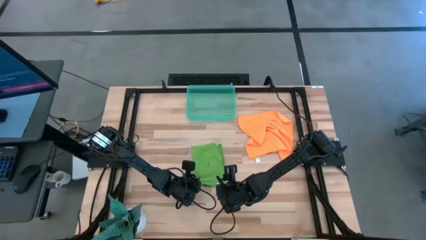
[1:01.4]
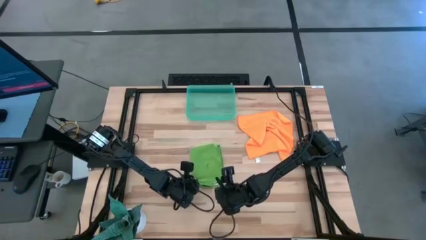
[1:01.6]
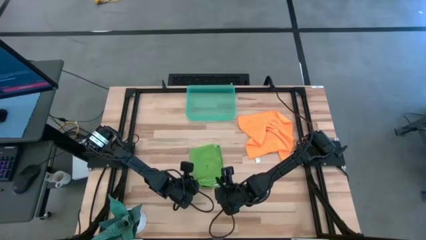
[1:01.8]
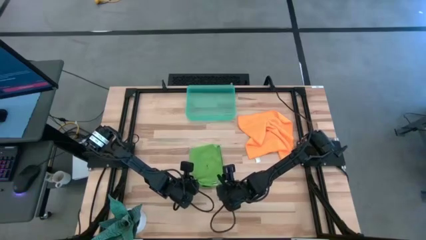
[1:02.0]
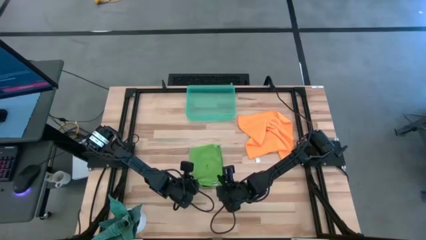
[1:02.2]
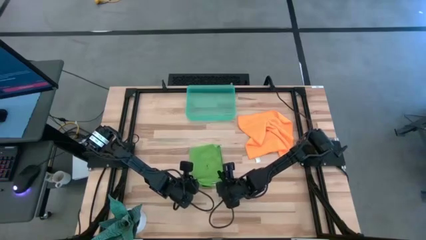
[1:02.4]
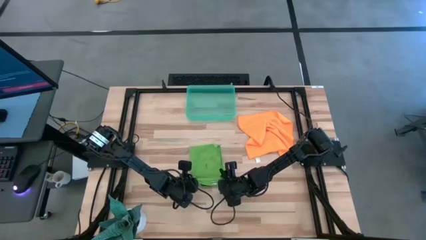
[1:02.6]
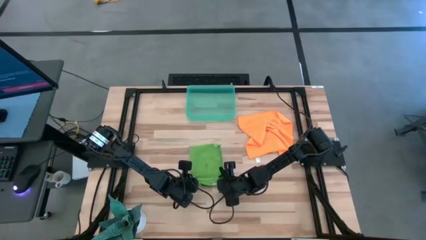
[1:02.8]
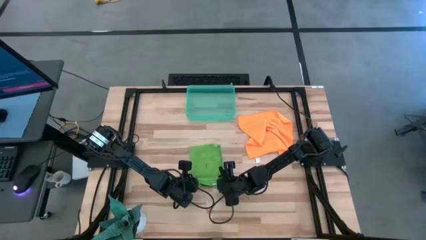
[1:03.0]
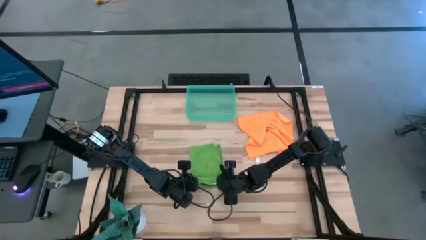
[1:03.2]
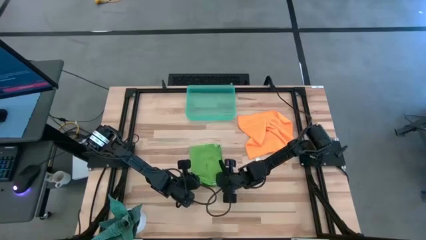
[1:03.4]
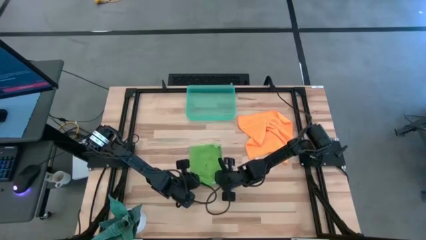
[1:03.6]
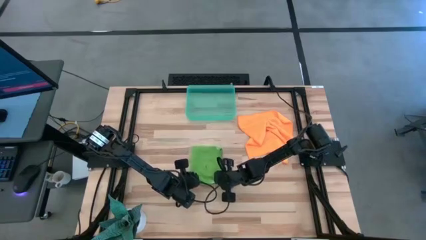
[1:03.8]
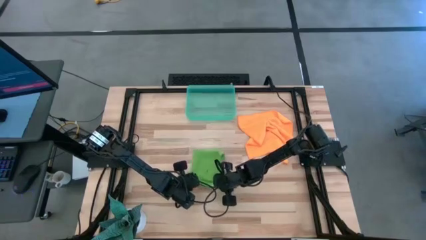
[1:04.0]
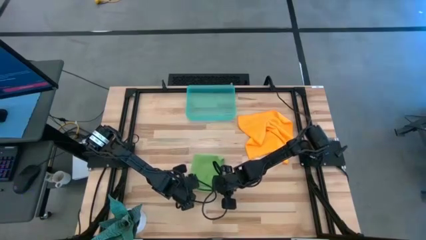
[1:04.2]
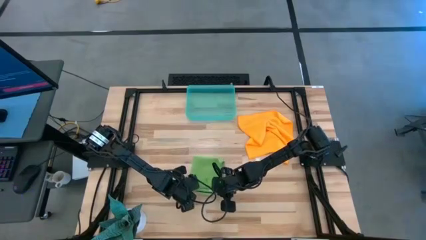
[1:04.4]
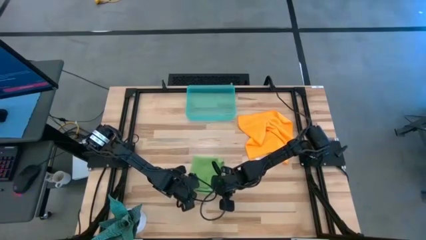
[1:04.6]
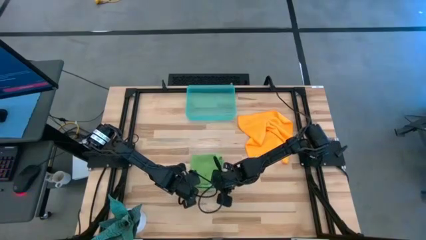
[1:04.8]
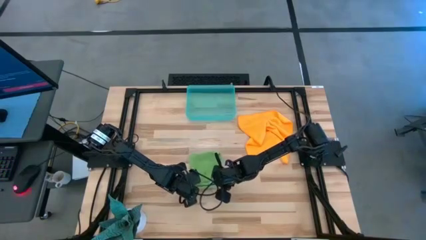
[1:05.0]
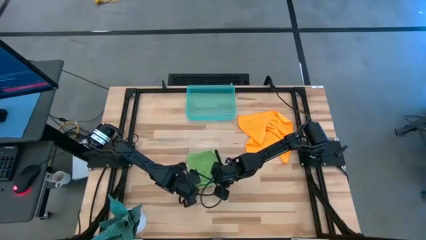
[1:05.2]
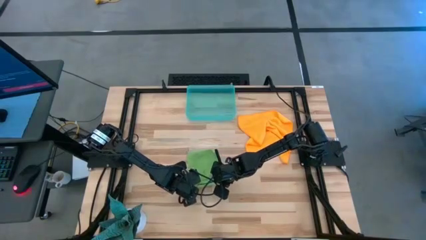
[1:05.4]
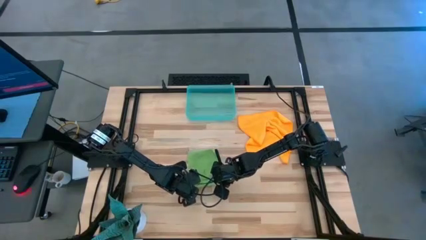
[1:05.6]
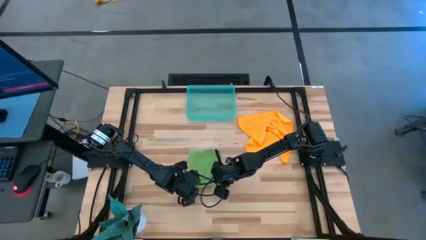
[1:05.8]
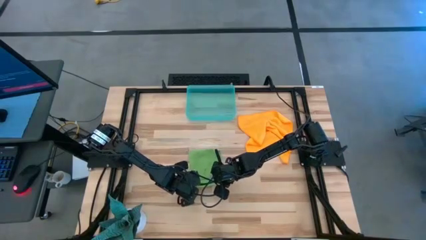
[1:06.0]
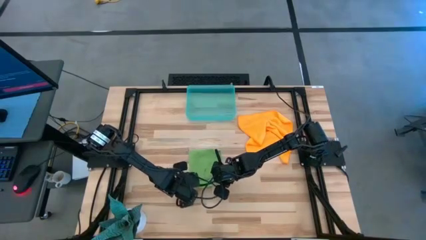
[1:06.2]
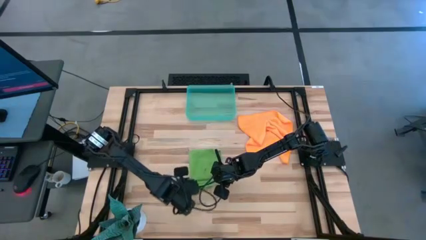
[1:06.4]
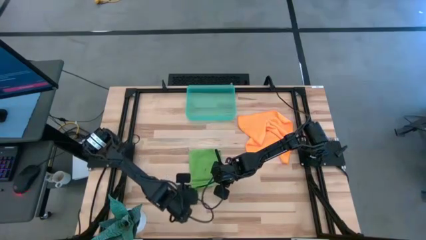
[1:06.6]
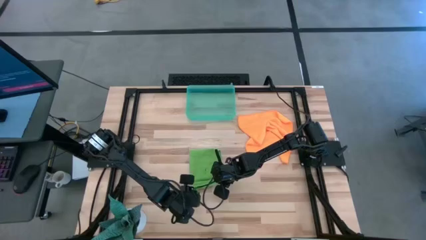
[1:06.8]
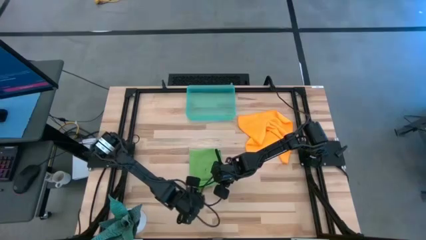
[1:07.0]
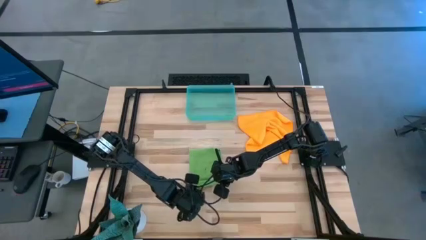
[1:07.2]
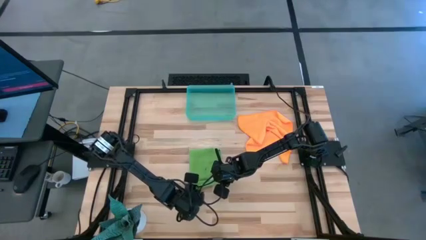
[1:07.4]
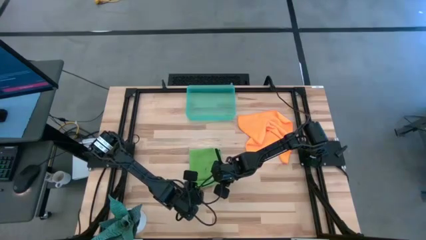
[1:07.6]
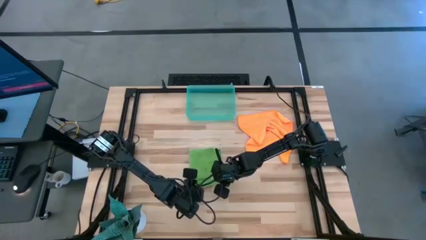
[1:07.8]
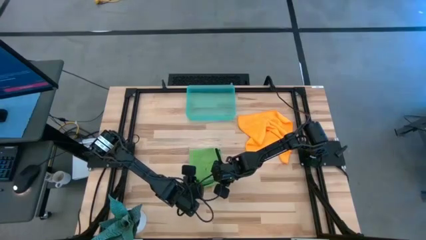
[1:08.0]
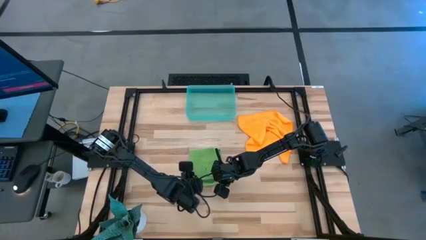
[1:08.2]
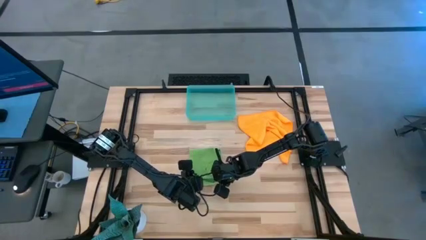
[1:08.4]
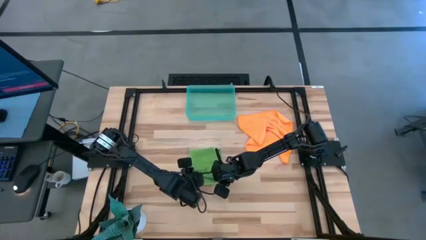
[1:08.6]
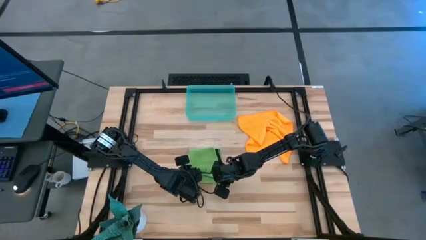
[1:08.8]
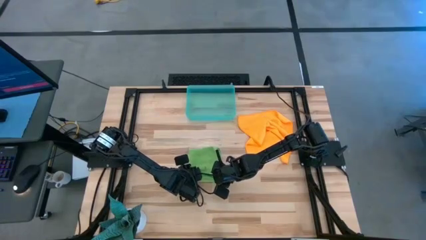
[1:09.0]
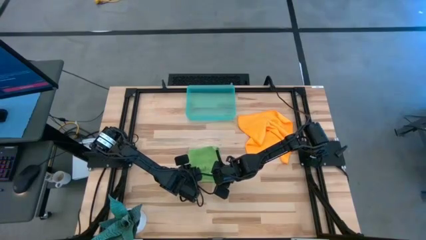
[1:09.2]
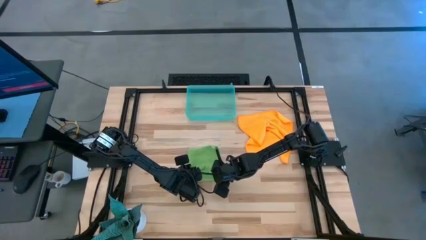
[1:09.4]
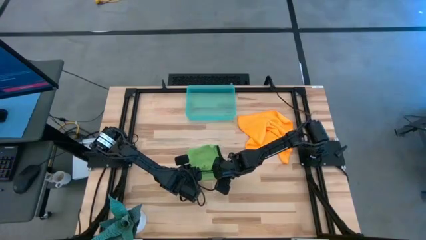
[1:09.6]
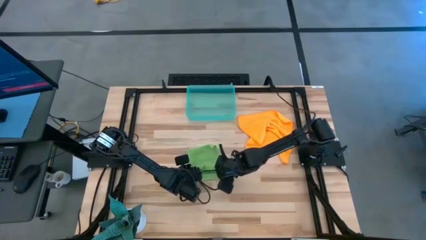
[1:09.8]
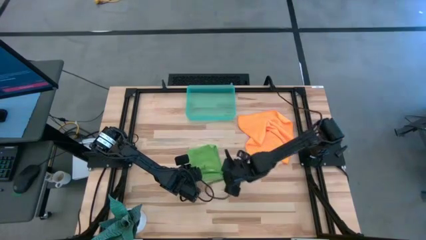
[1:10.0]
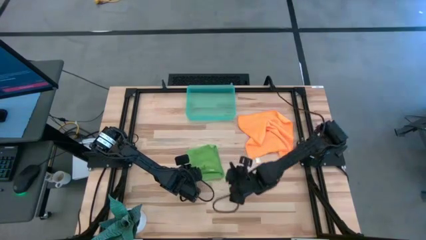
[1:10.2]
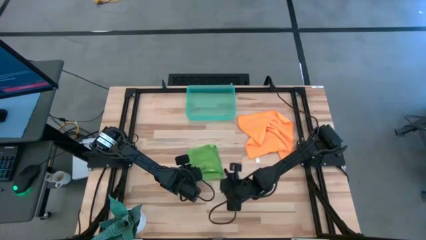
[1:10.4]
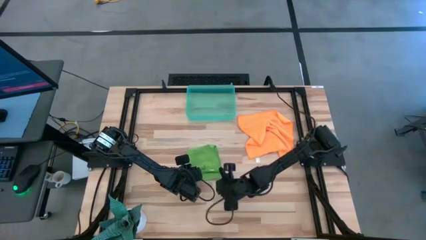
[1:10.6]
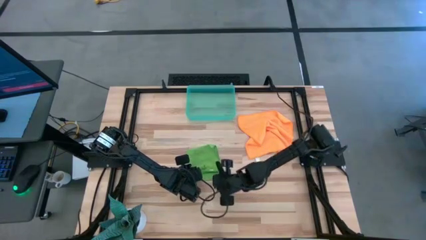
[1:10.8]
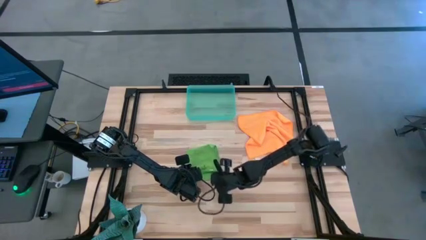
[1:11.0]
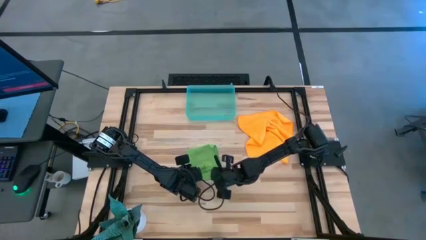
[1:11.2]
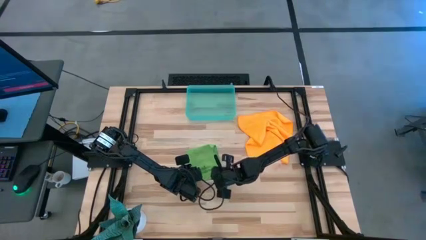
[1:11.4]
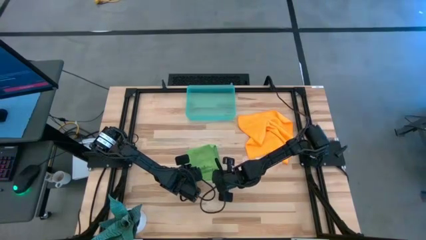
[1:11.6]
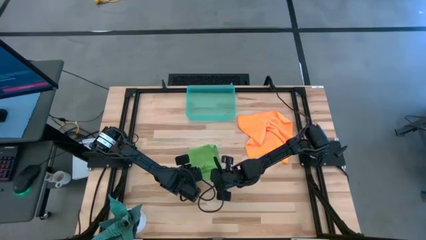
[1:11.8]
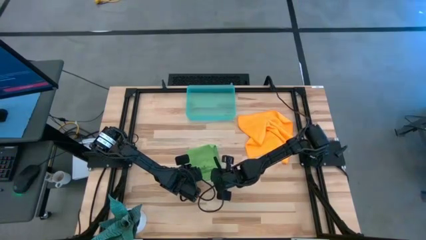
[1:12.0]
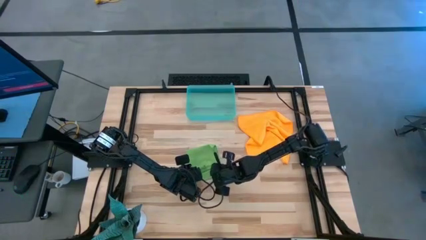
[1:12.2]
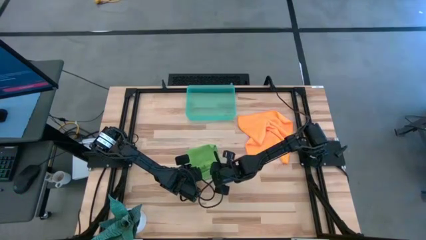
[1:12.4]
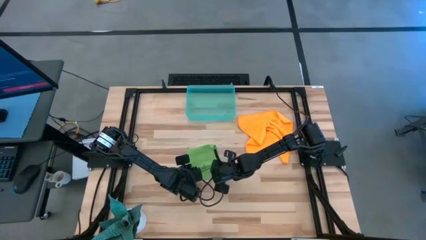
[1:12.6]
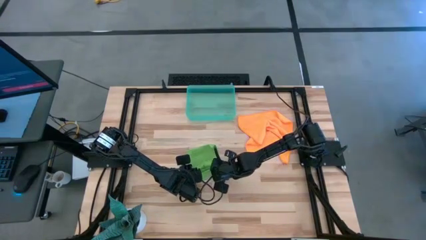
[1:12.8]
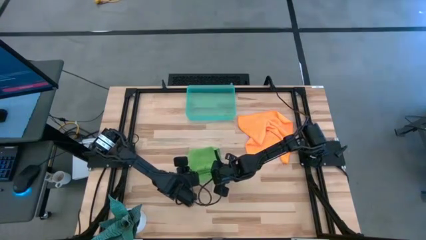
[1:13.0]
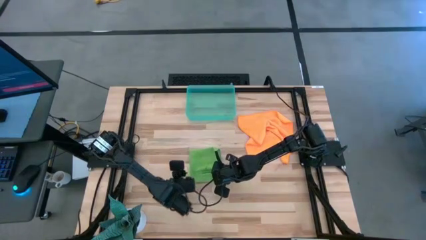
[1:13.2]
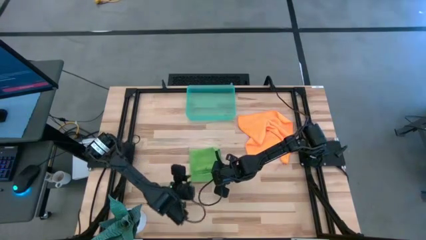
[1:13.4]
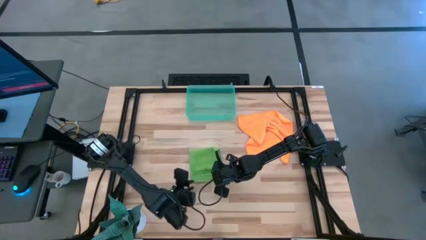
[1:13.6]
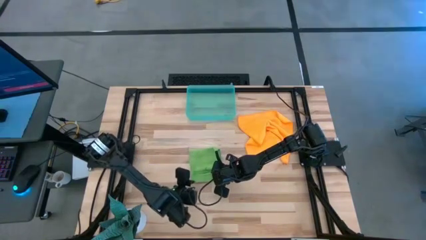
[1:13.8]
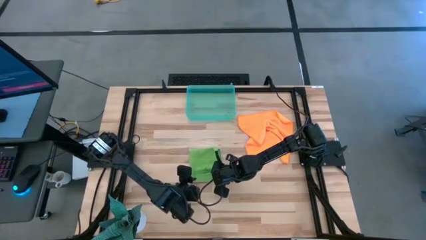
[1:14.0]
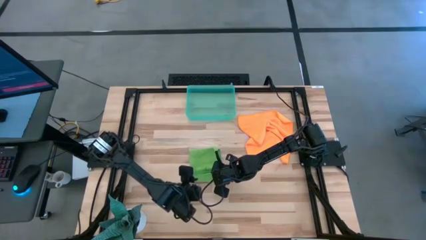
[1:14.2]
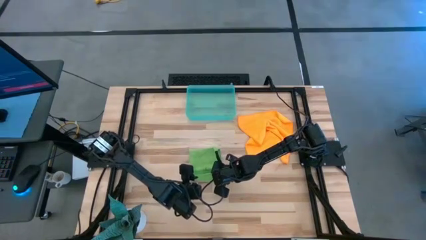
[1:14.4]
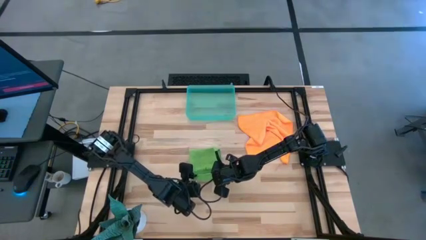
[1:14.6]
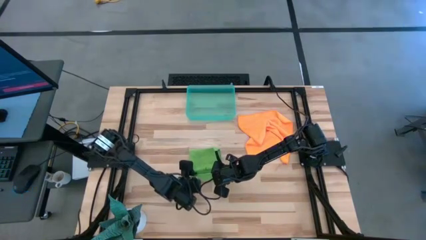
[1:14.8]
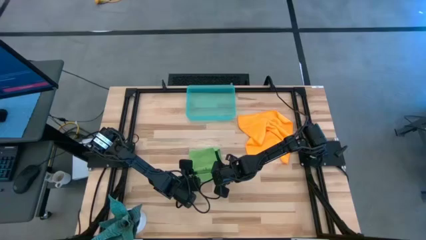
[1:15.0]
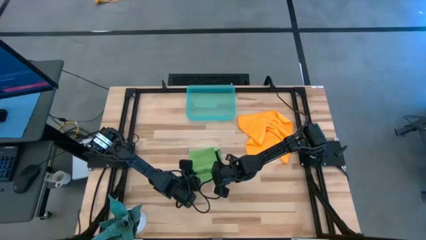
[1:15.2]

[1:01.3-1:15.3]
Task: Roll microfiber towels into tight, uniform cylinder then place into a basket
Roll the green towel
